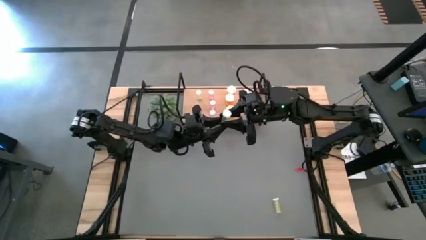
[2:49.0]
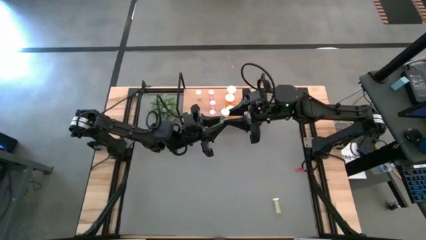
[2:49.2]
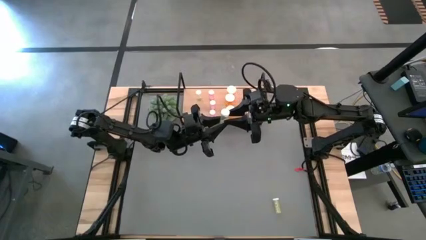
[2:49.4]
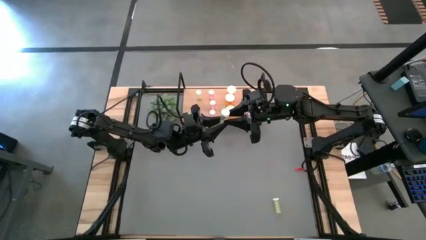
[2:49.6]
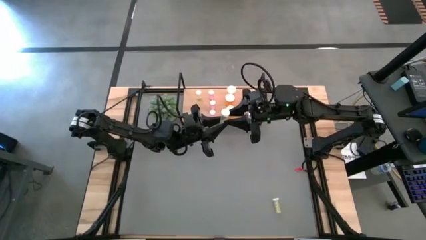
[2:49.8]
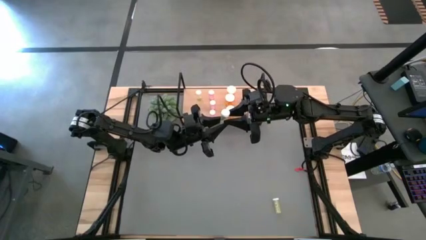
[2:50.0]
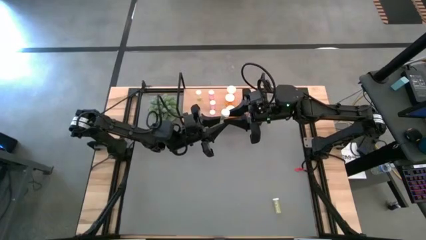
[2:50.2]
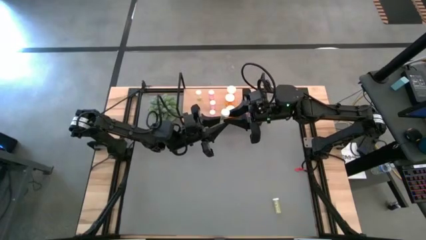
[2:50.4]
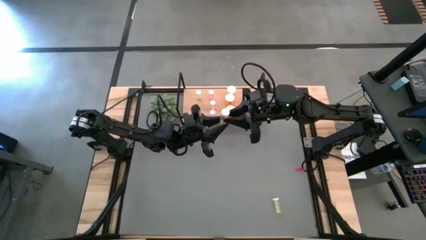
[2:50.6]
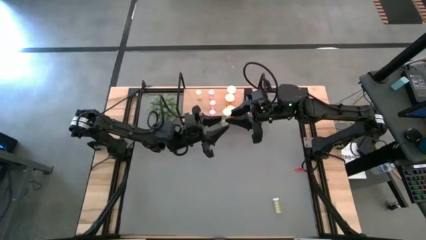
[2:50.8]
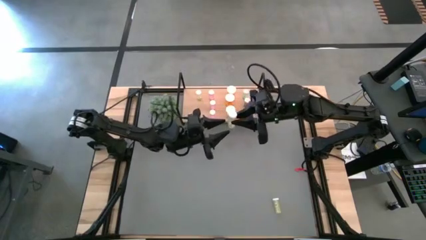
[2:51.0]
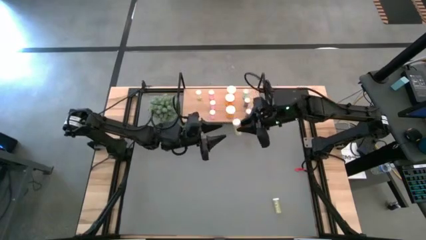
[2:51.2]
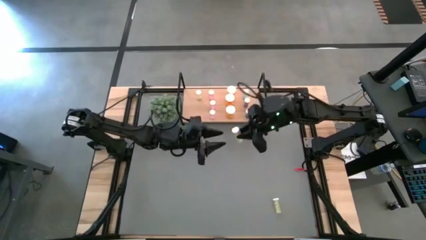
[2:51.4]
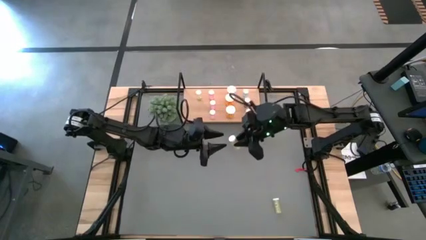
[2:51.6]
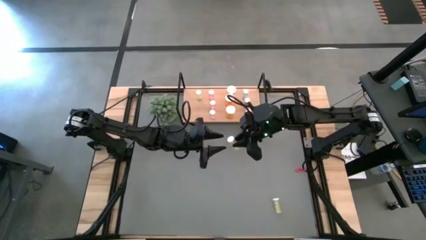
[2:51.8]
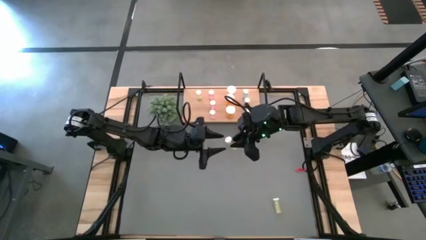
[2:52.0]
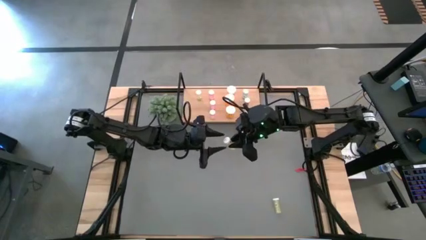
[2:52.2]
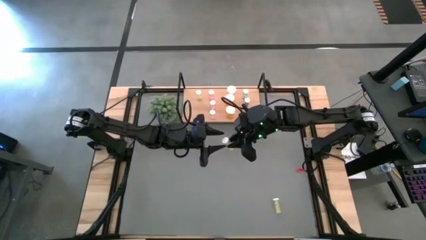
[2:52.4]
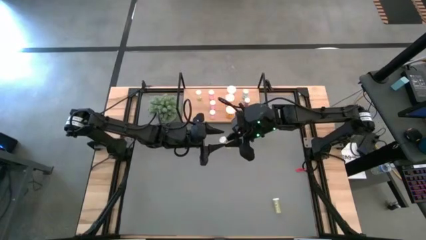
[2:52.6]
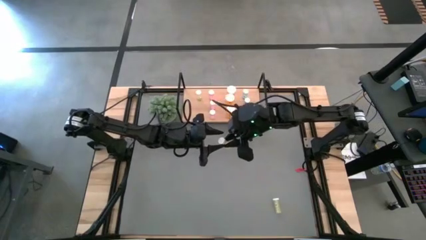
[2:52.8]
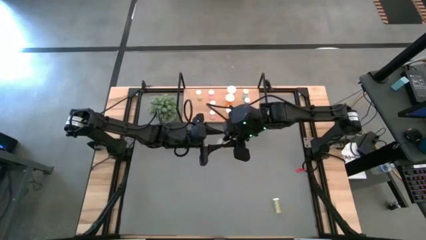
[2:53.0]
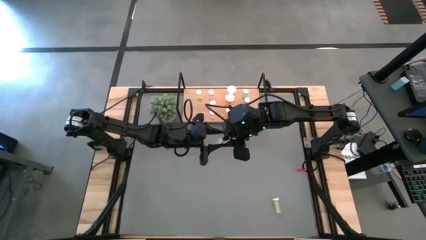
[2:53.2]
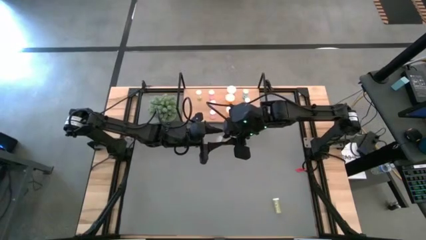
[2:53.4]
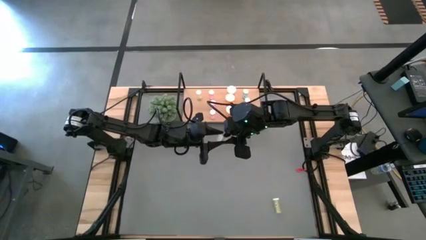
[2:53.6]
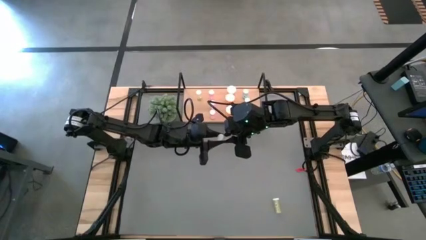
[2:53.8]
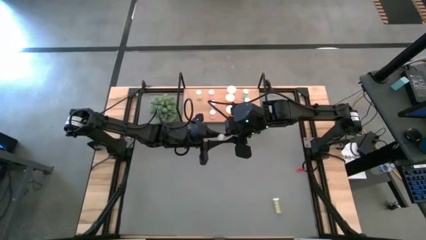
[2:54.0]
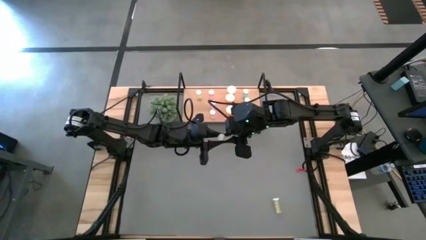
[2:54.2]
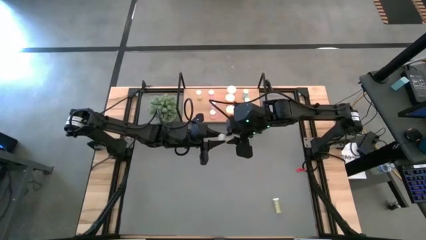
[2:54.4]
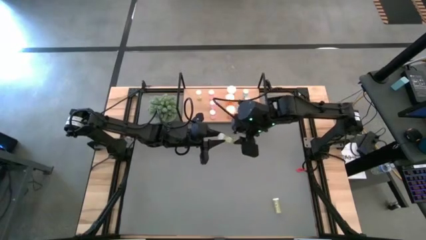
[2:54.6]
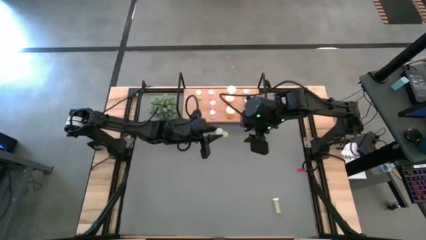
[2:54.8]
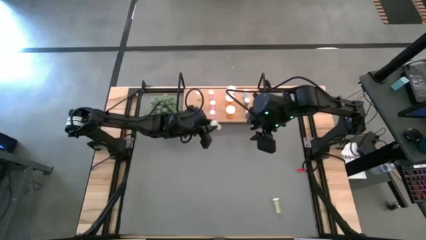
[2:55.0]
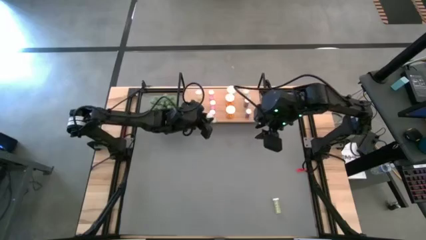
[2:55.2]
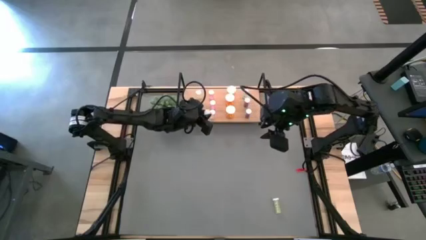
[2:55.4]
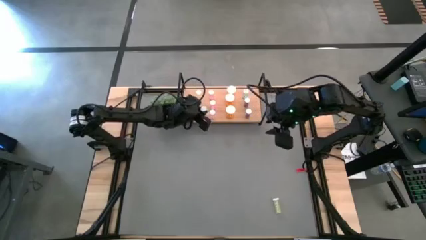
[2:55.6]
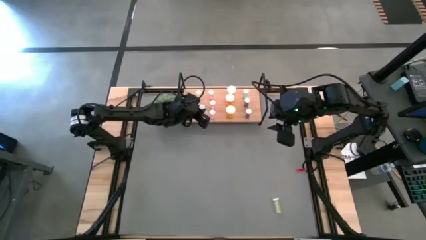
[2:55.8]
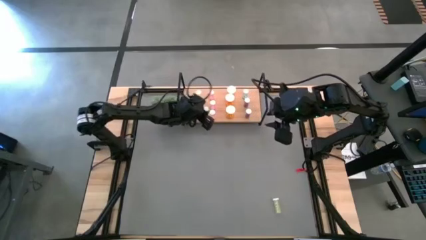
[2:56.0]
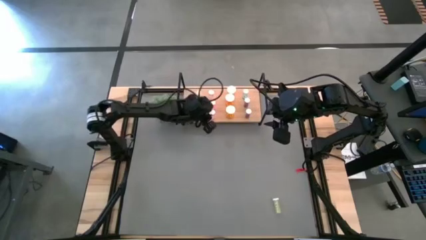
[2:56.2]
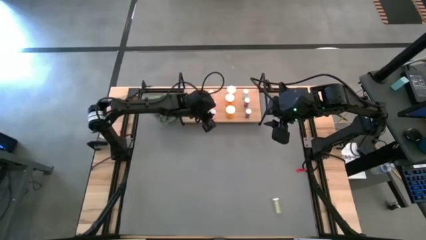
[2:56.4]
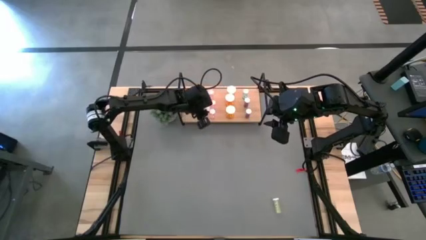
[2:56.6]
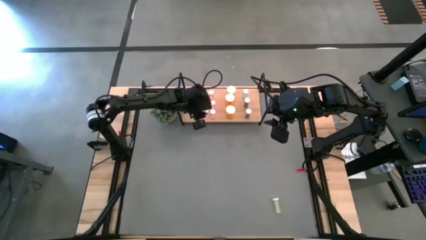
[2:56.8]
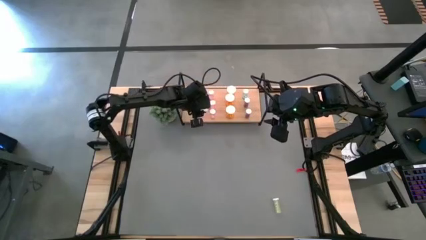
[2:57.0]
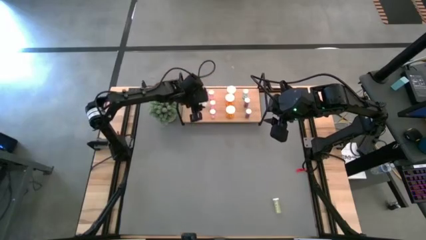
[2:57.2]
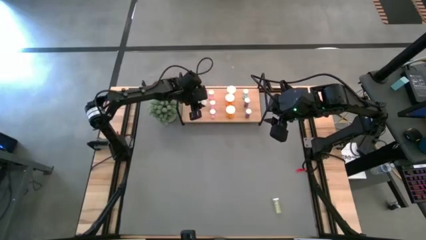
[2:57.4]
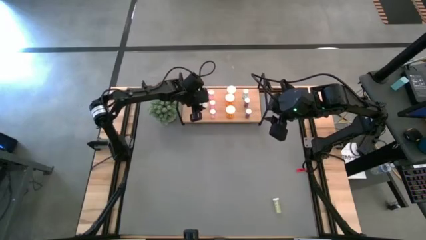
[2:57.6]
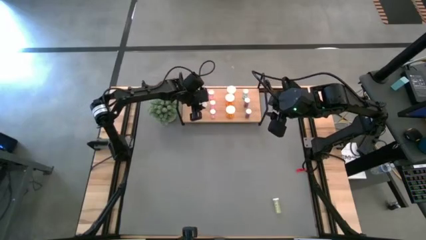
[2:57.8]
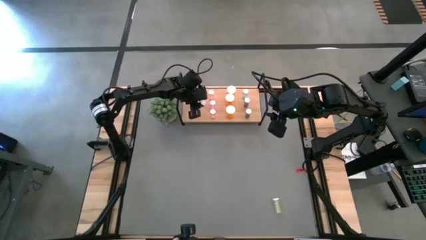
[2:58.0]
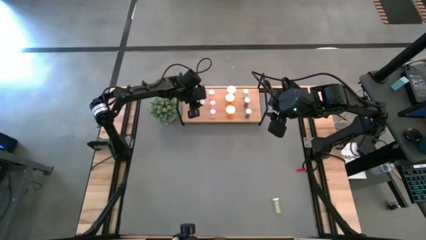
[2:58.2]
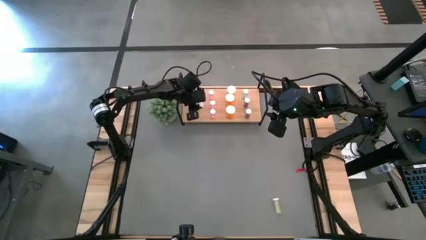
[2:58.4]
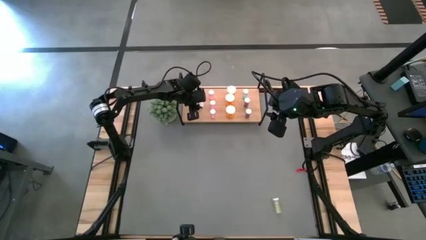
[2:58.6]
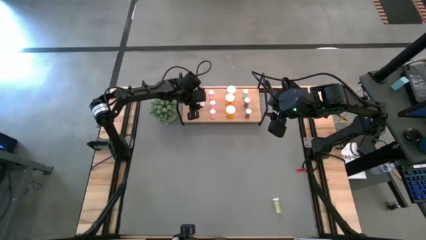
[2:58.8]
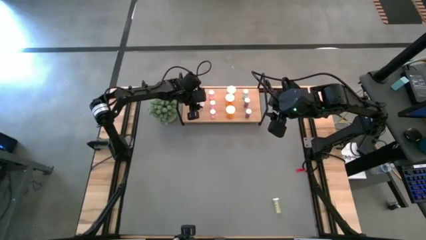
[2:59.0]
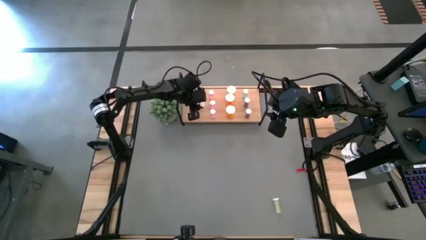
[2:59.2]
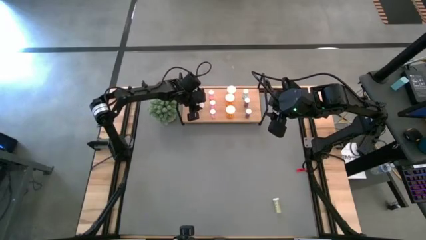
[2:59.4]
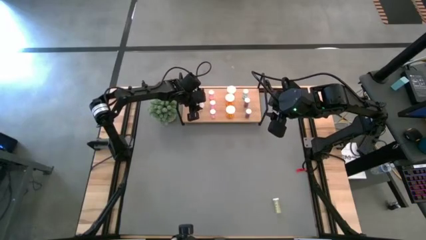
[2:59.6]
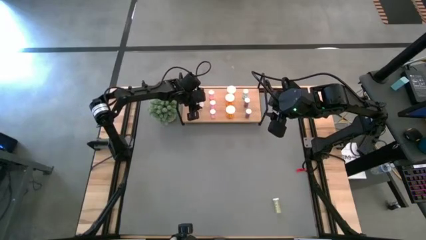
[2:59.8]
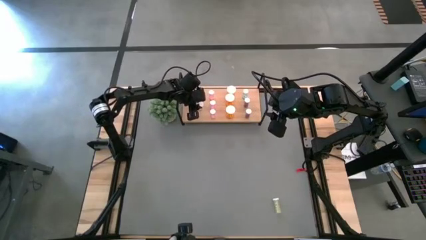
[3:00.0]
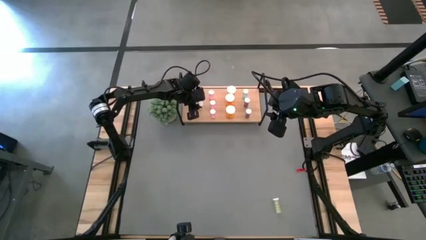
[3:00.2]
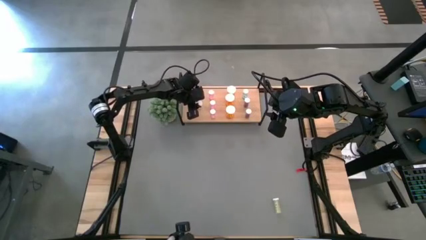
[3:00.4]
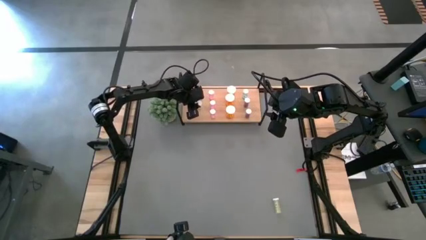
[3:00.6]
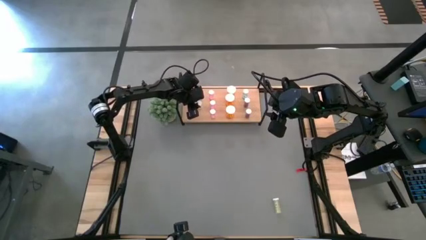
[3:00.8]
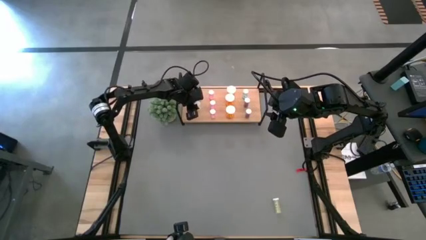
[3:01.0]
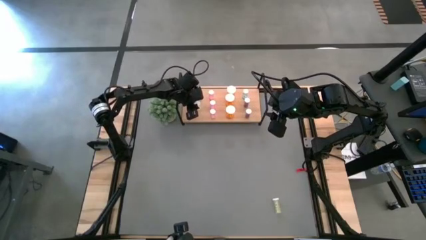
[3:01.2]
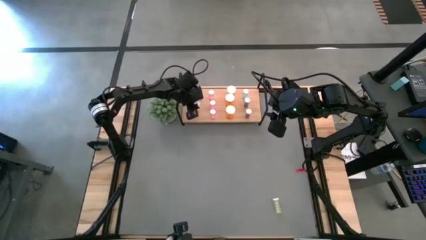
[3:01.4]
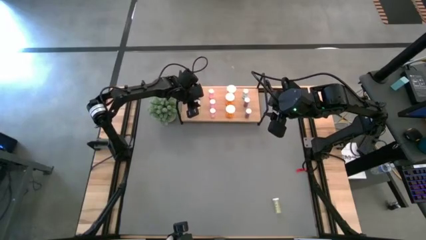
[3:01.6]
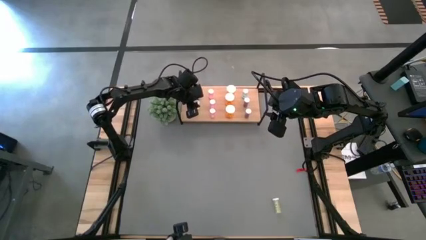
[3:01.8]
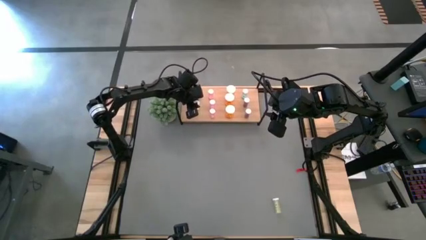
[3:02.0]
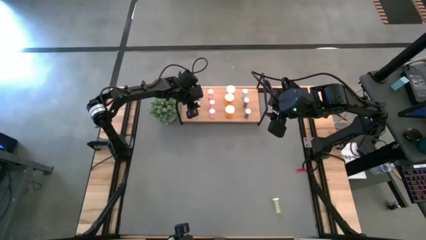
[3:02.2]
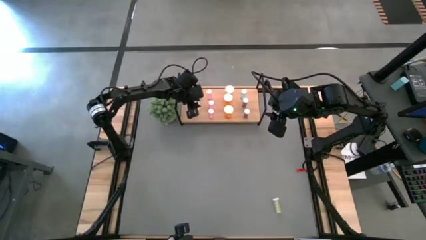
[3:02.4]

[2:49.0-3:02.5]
Task: Pick and place medicine bottles onto shelf by color
Put the left yellow pill bottle on the shelf aligned with the other yellow pill bottle

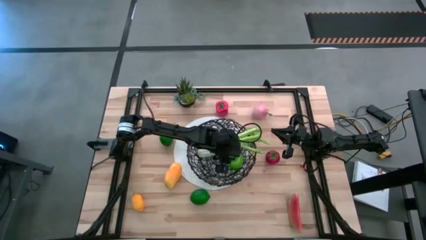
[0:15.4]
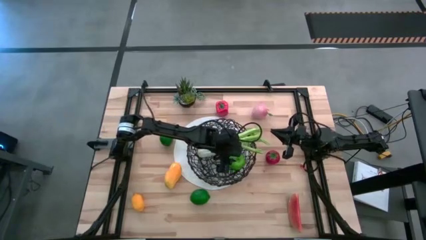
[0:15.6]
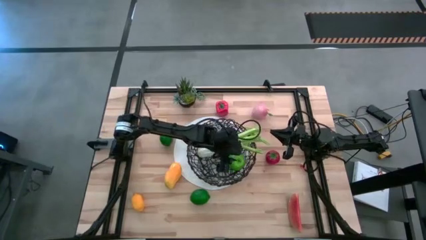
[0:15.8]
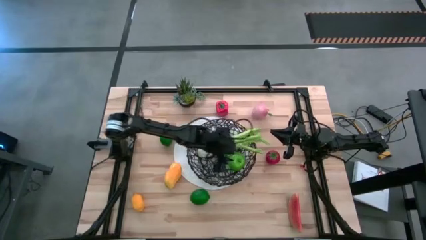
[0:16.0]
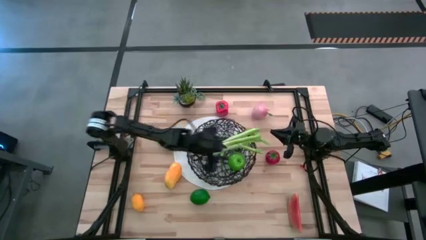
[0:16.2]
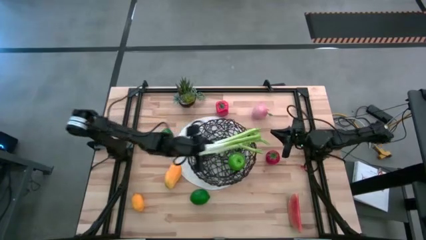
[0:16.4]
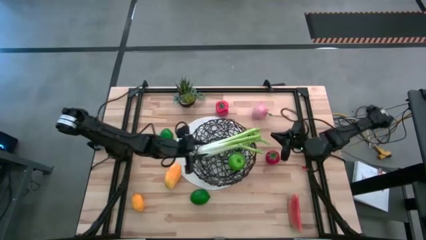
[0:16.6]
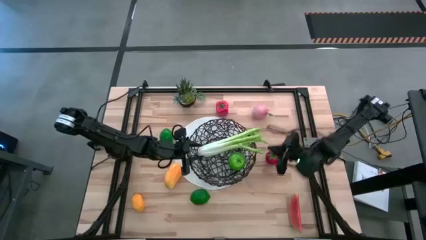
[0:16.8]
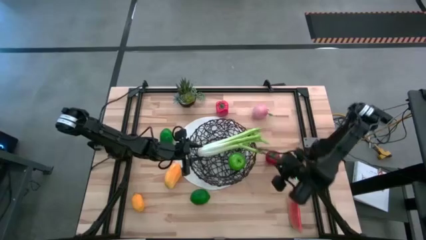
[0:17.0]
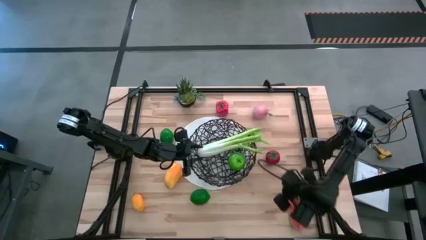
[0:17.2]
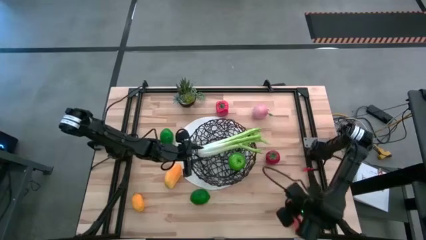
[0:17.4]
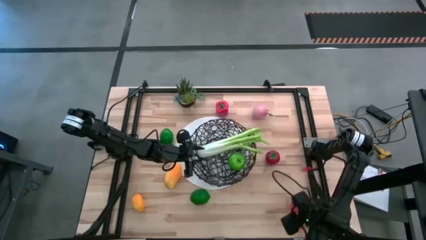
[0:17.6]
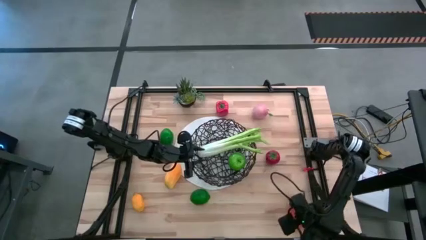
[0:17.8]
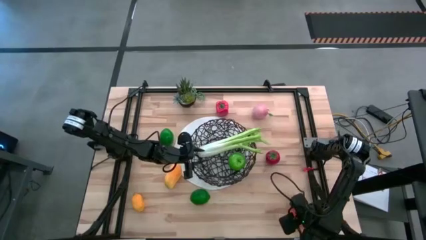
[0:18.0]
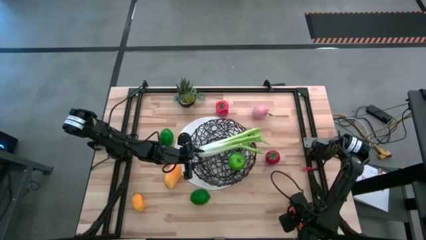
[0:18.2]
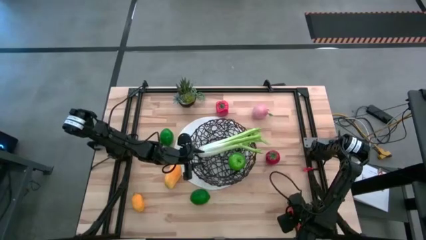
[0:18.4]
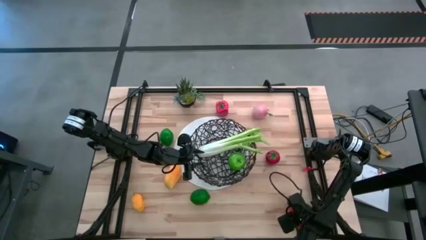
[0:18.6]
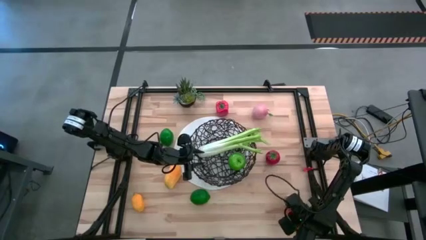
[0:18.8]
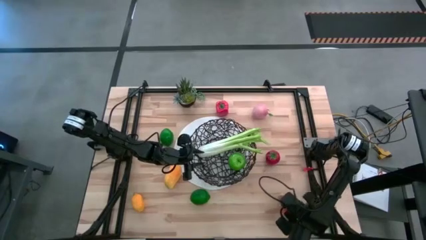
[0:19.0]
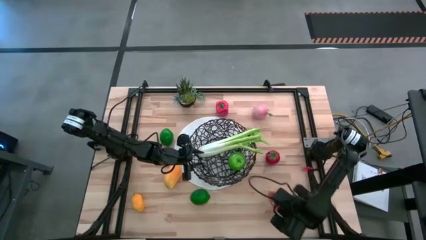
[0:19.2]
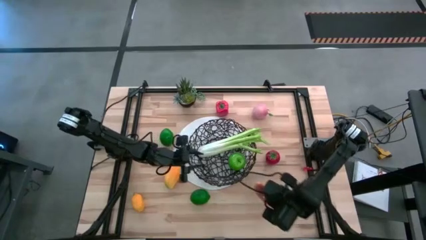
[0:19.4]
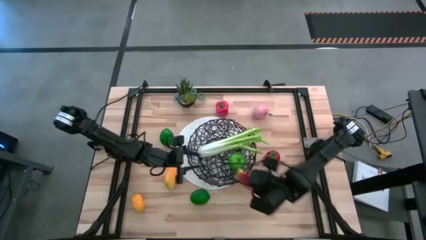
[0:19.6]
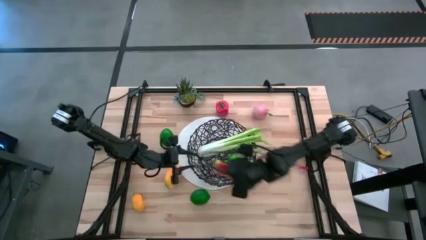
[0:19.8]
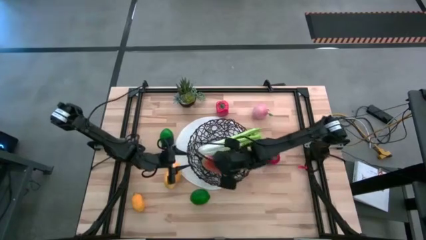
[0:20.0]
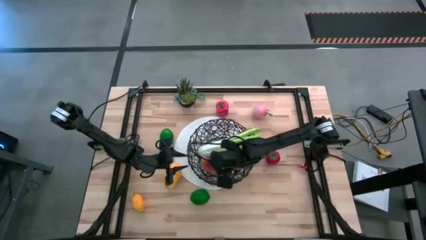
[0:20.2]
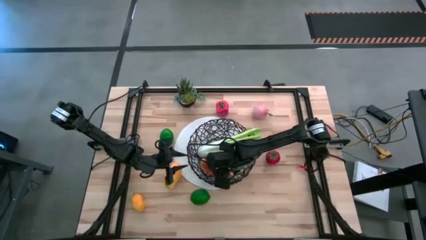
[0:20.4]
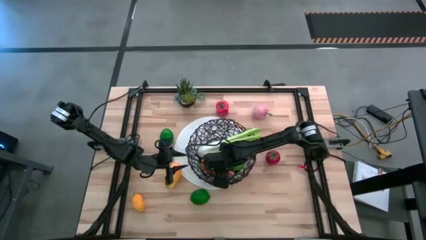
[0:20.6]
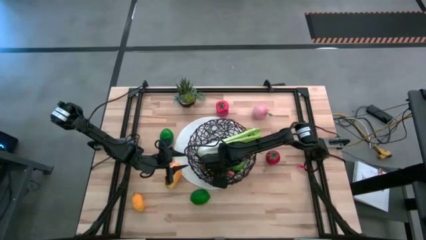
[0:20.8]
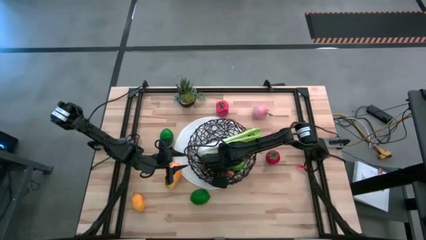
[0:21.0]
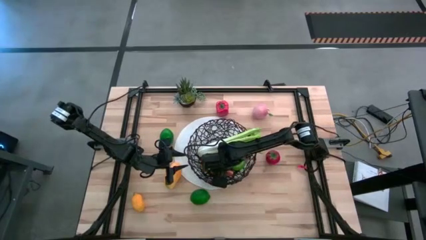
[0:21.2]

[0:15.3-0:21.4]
Task: Build produce basket
Put the orange watermelon into the wire basket
